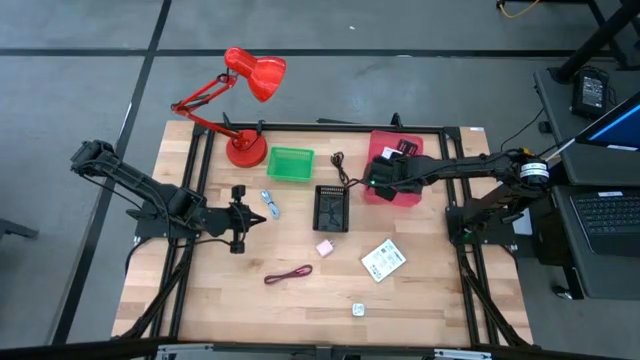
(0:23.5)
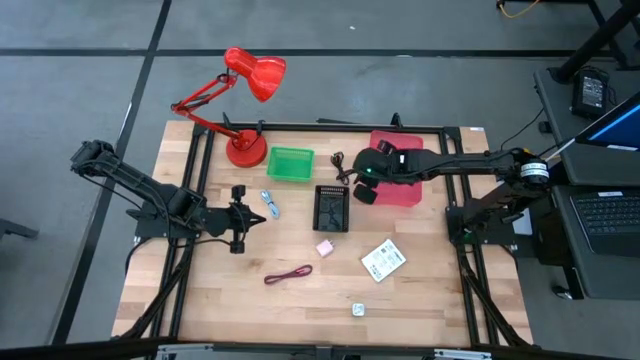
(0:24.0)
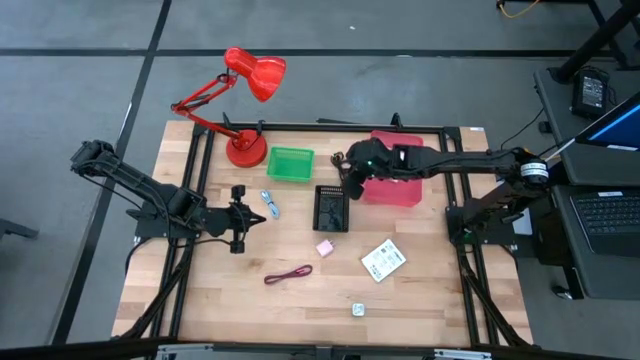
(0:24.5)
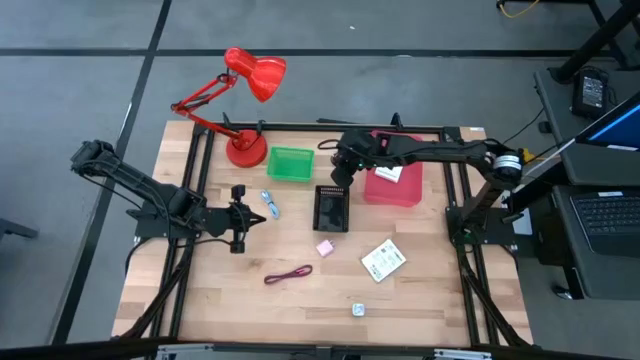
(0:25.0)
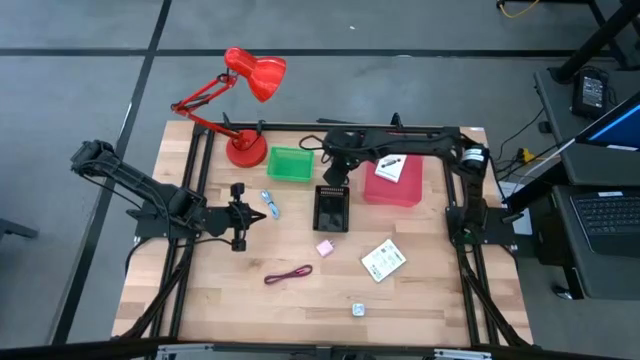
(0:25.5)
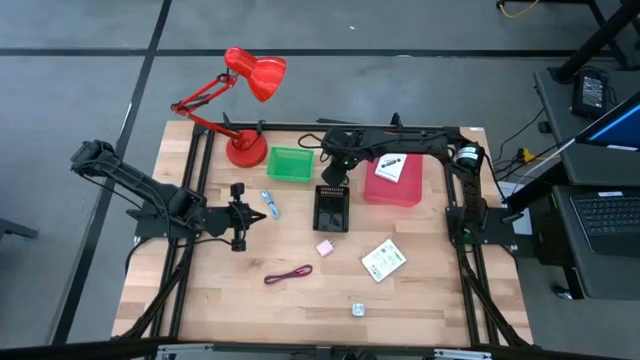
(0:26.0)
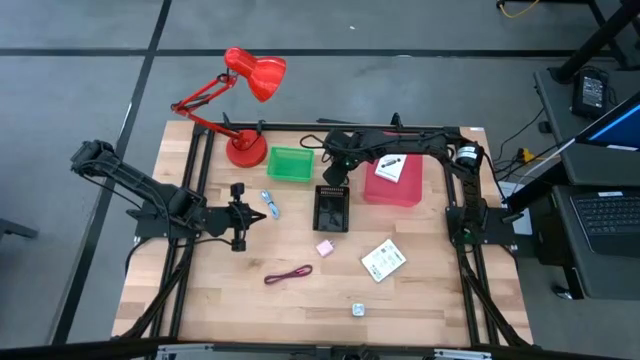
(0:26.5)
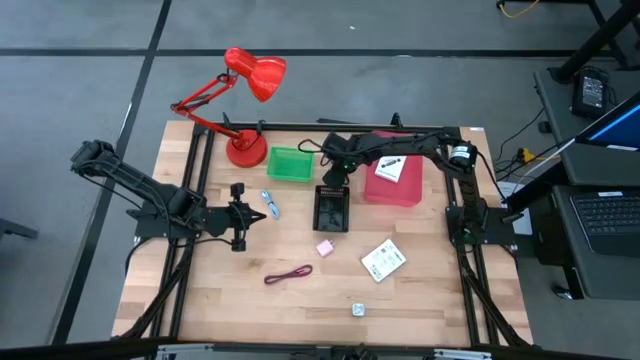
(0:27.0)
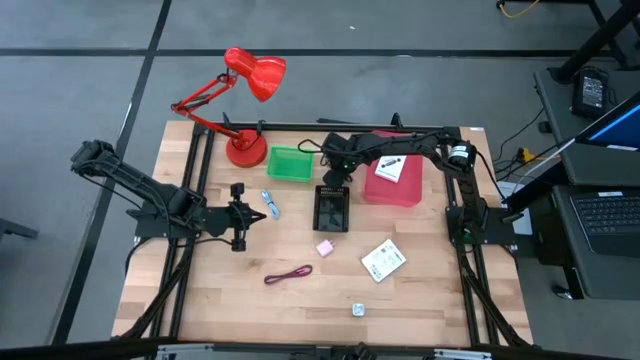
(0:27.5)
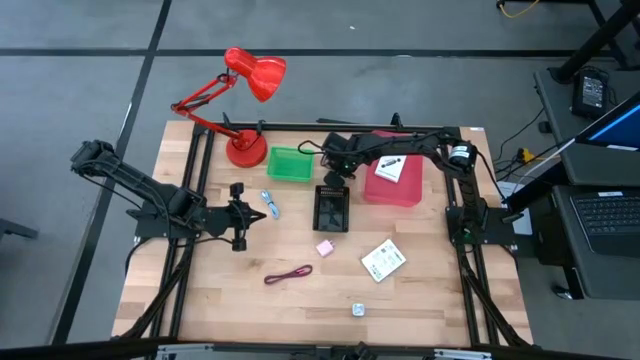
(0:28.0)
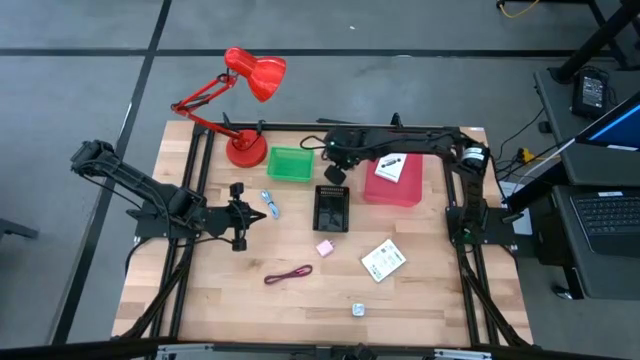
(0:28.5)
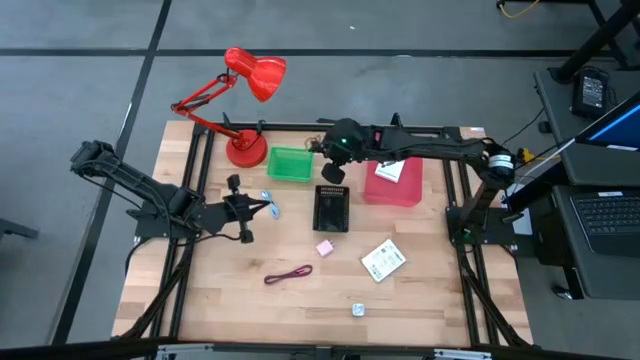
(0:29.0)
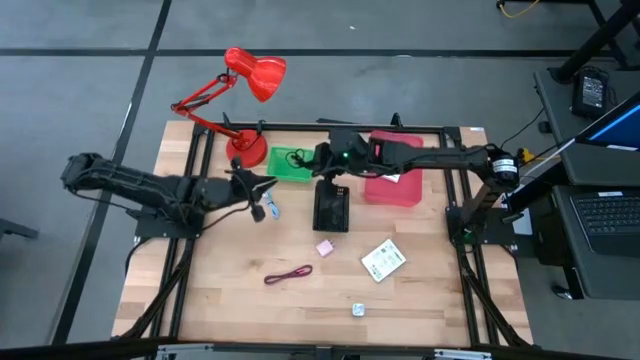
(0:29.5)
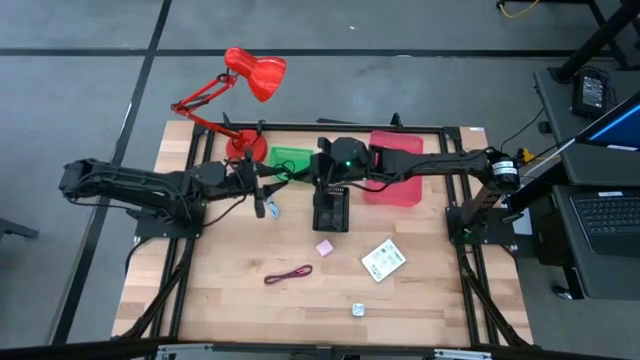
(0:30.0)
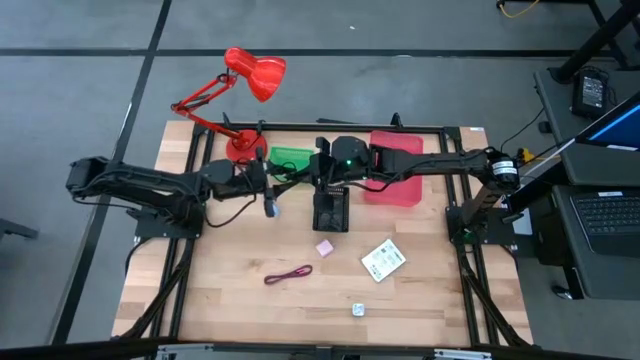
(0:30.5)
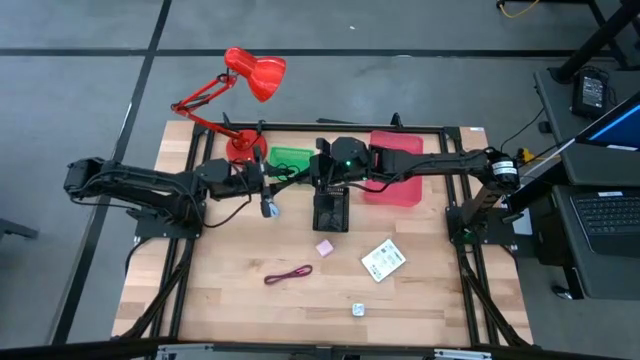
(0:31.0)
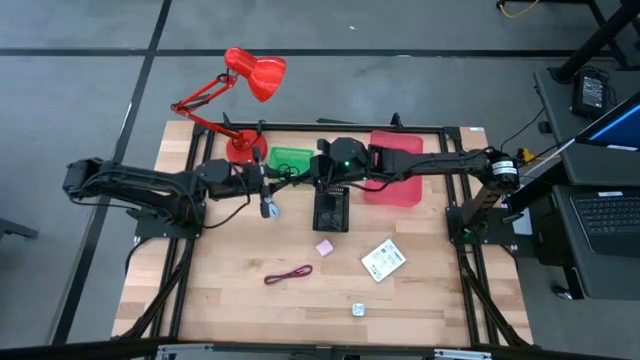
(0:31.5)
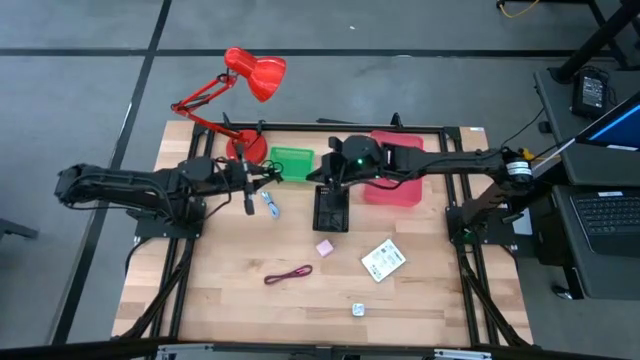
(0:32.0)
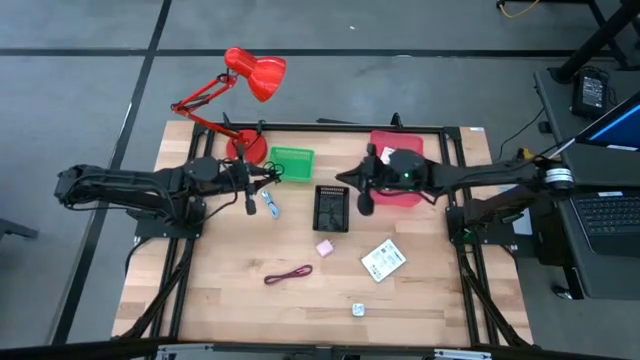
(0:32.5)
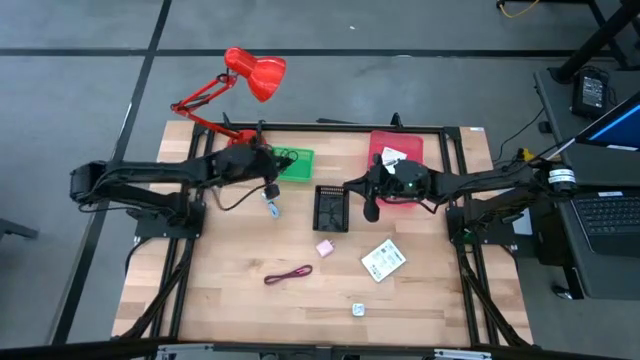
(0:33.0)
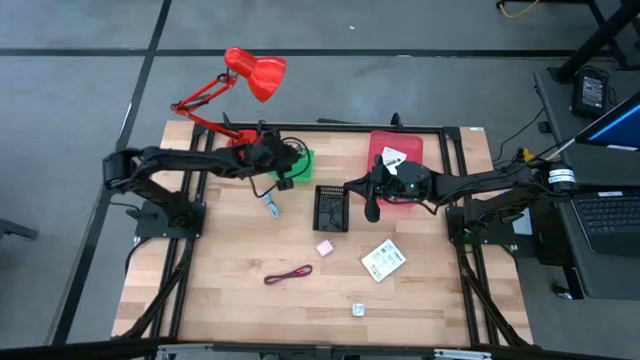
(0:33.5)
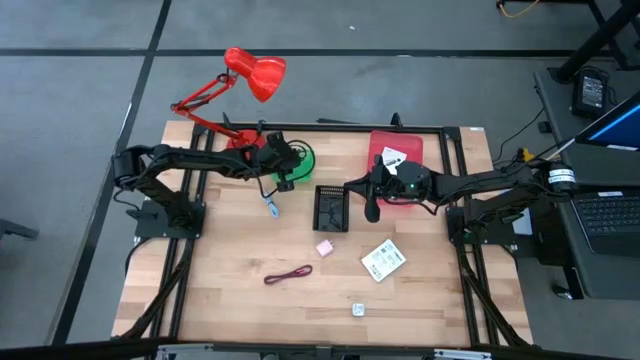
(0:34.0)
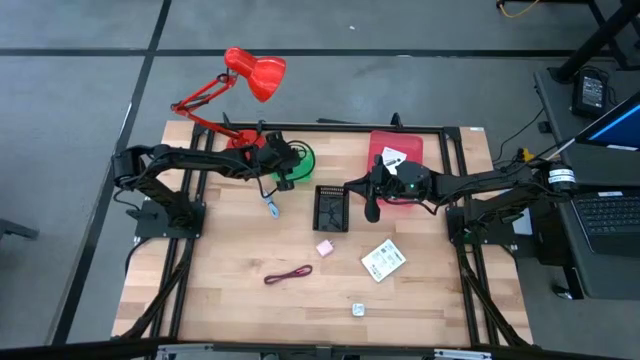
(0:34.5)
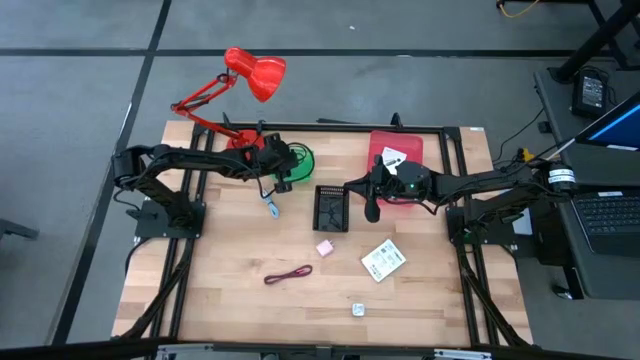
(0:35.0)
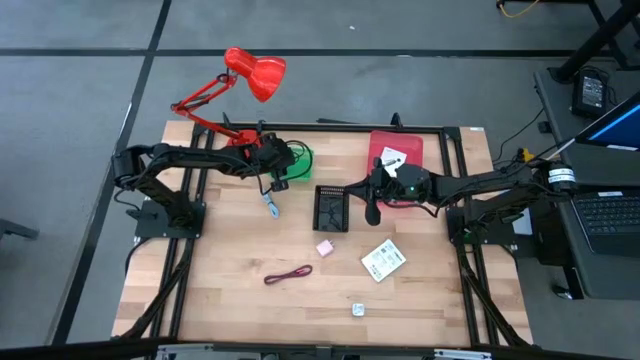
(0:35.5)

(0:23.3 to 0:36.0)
Task: Pick and place items into bin
Put the black charger cable into the green bin

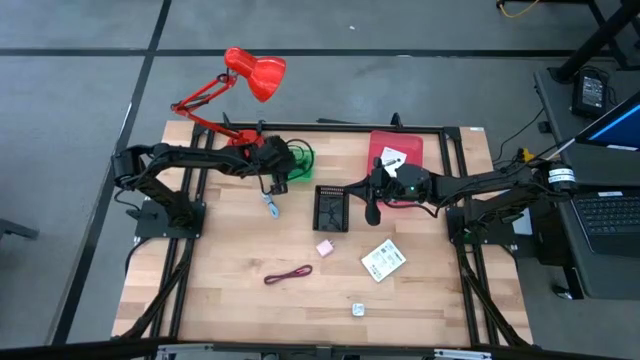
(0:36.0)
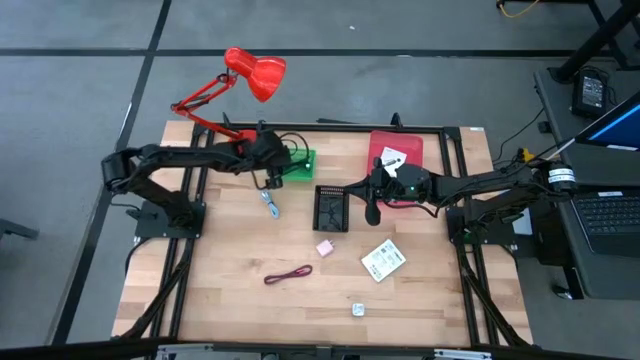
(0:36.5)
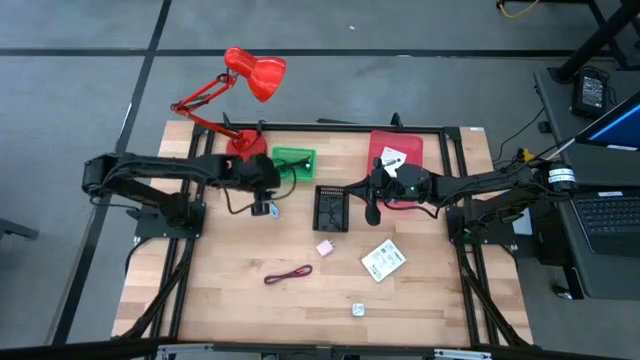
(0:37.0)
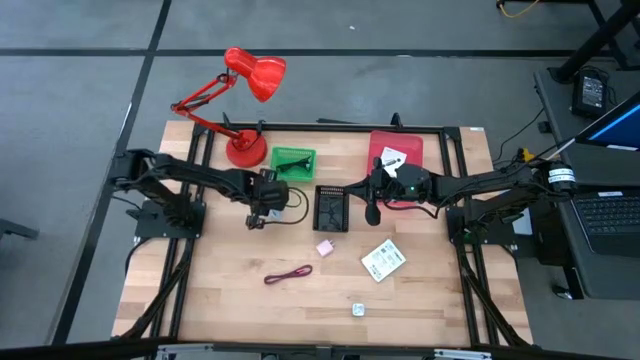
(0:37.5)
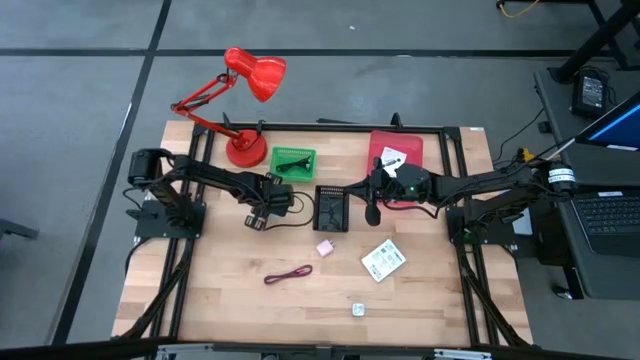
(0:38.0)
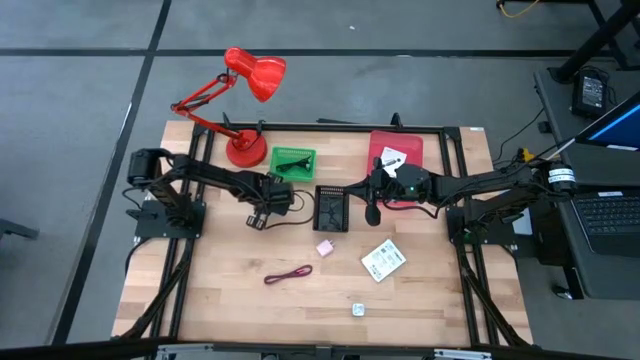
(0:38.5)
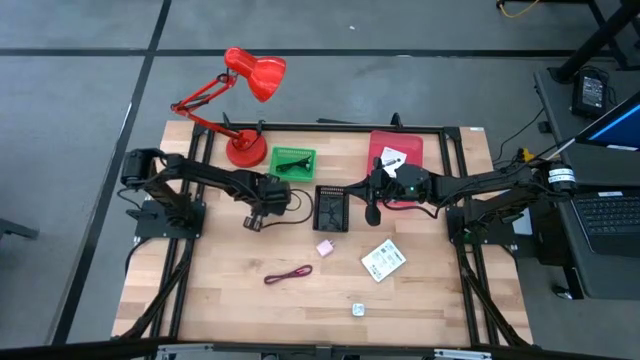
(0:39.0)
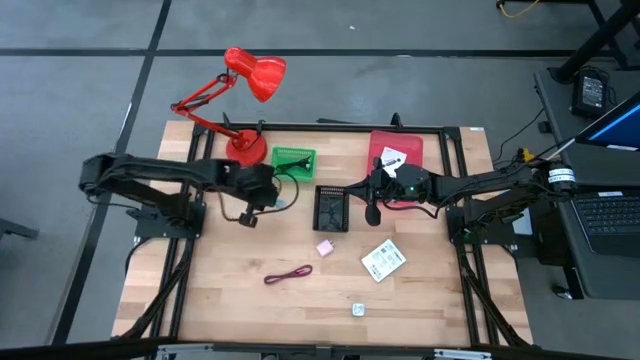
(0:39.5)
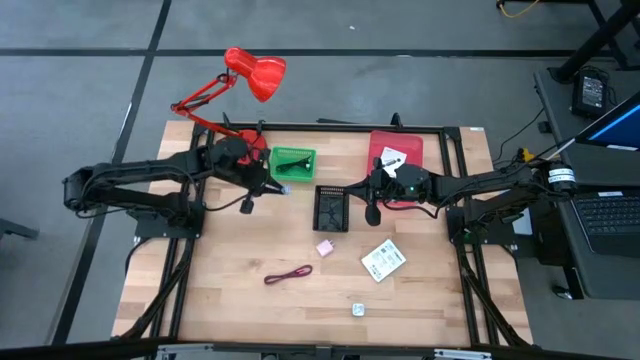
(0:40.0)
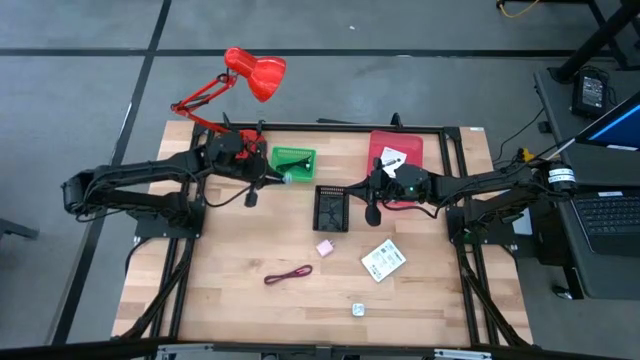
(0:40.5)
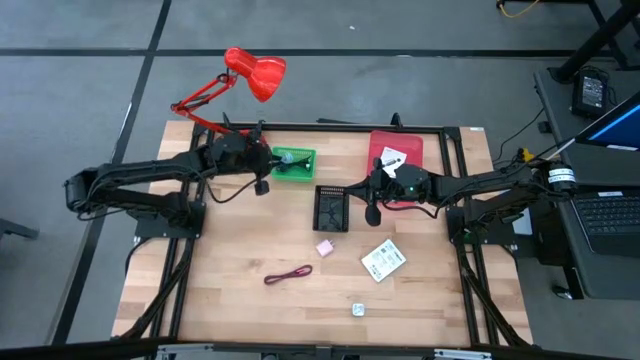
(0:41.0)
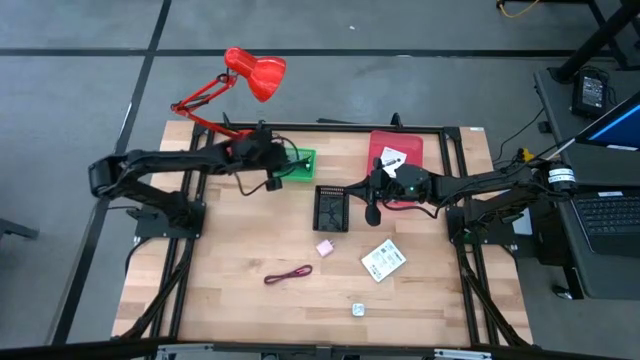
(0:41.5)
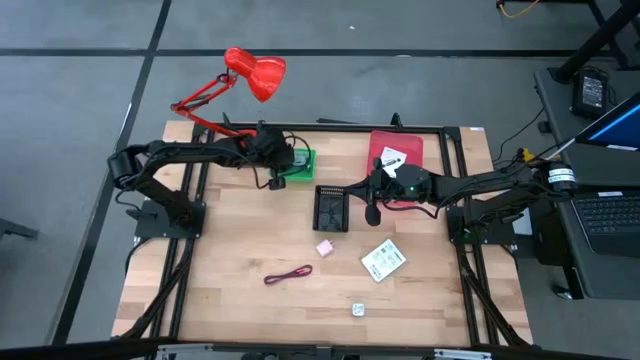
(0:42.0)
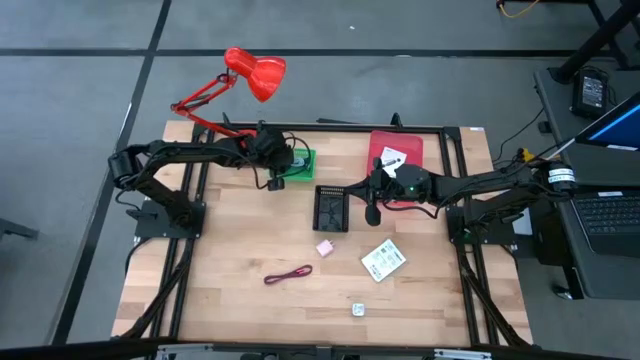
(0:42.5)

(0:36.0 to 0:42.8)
Put the blue charger cable into the green bin
